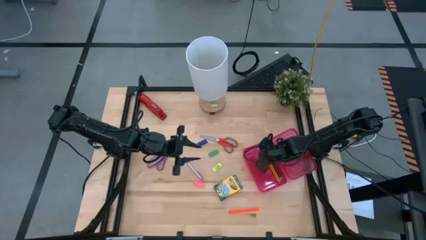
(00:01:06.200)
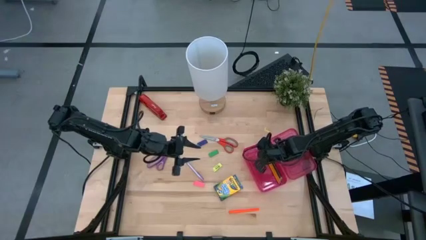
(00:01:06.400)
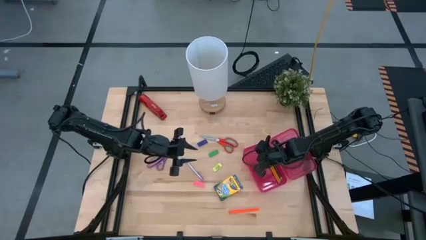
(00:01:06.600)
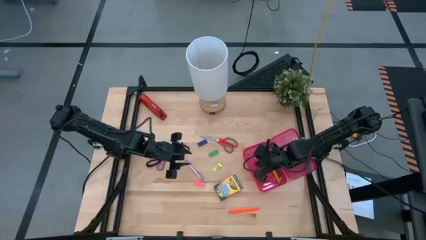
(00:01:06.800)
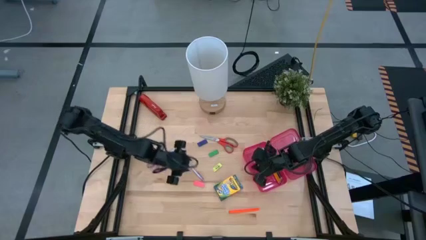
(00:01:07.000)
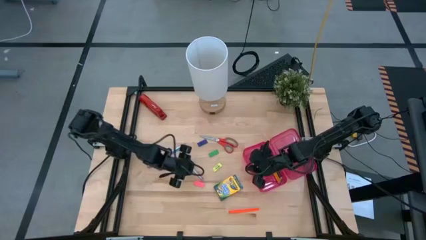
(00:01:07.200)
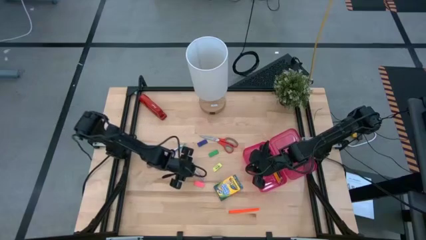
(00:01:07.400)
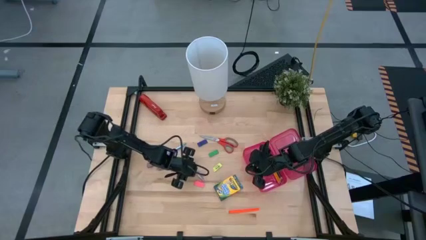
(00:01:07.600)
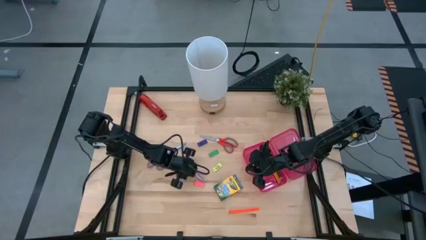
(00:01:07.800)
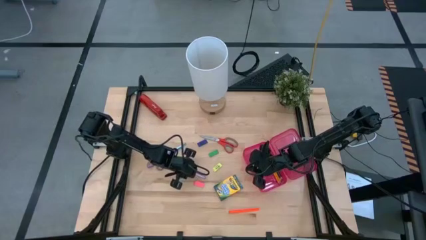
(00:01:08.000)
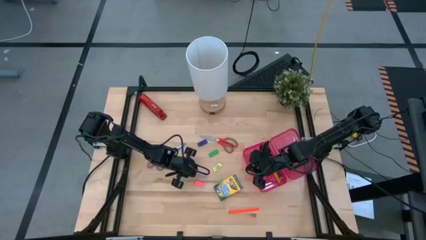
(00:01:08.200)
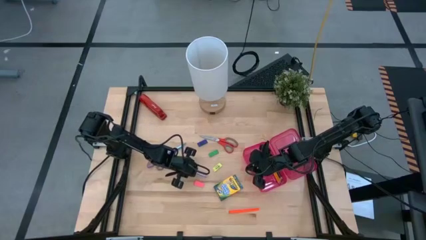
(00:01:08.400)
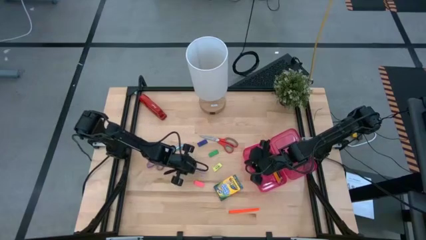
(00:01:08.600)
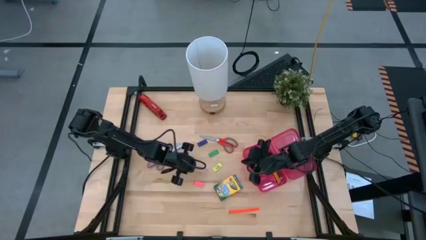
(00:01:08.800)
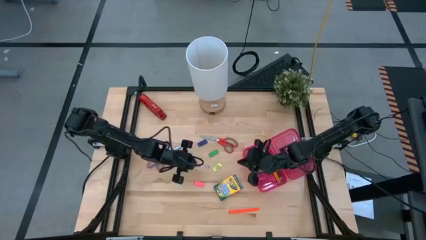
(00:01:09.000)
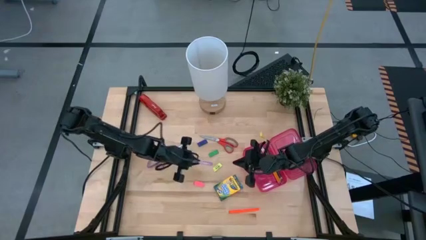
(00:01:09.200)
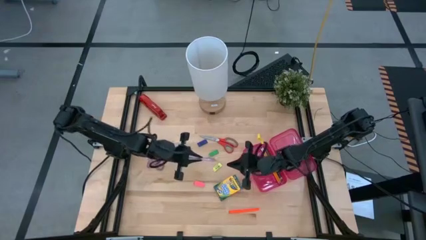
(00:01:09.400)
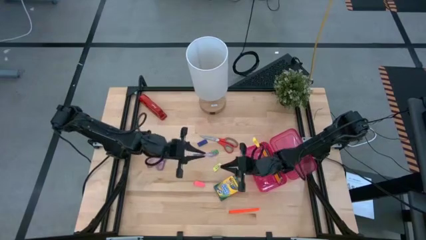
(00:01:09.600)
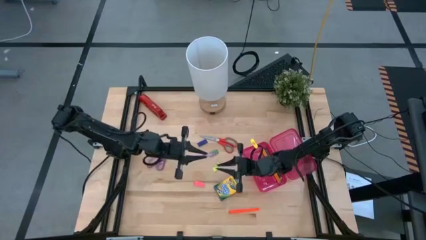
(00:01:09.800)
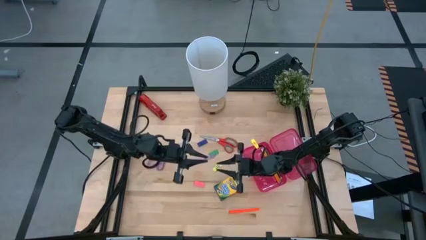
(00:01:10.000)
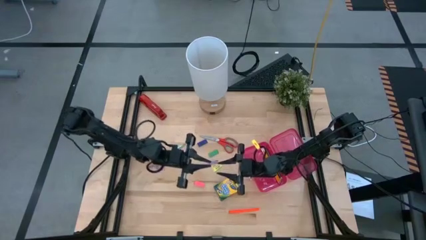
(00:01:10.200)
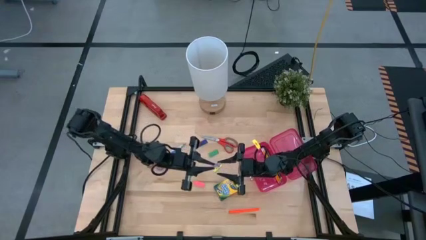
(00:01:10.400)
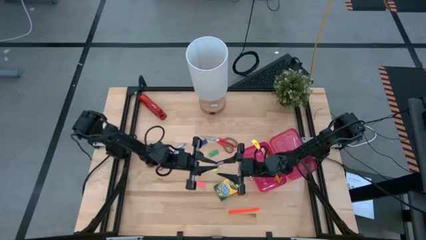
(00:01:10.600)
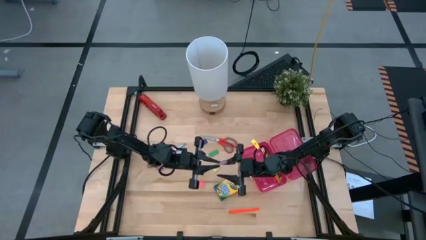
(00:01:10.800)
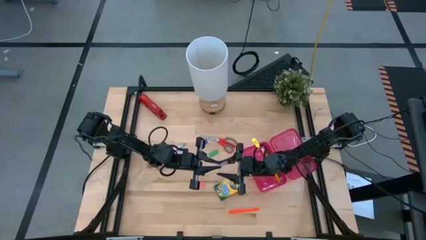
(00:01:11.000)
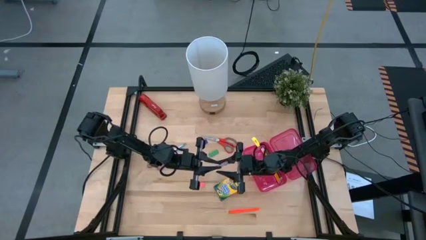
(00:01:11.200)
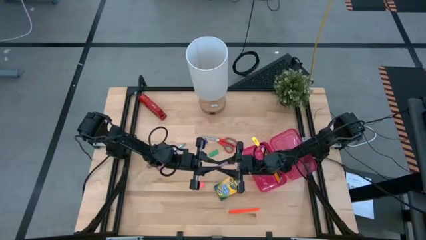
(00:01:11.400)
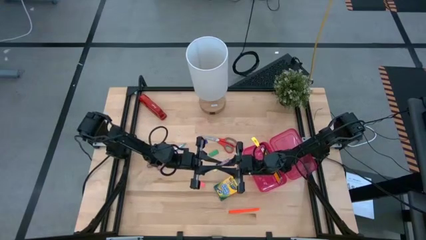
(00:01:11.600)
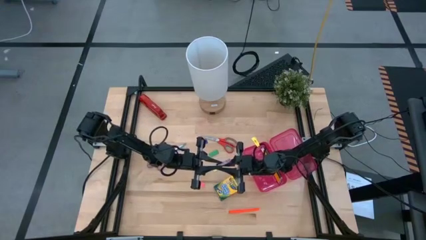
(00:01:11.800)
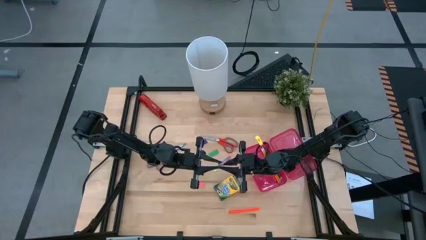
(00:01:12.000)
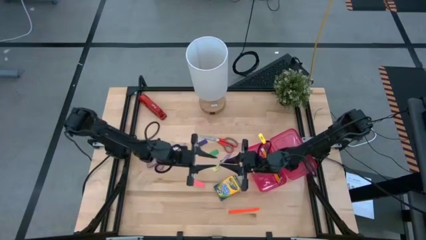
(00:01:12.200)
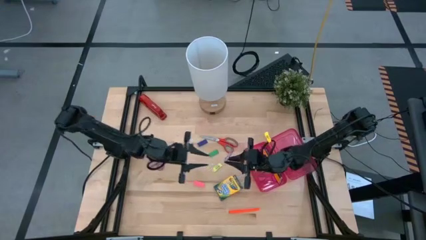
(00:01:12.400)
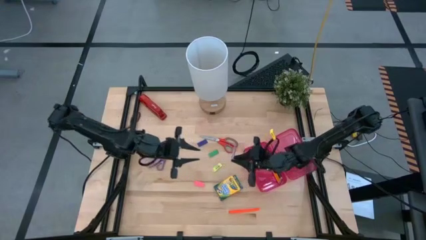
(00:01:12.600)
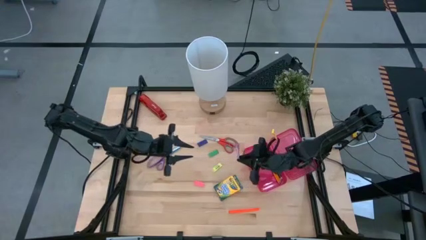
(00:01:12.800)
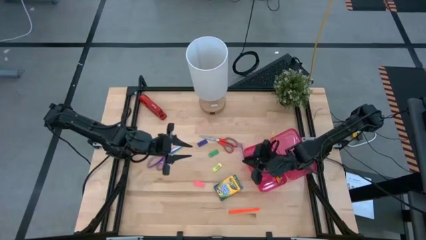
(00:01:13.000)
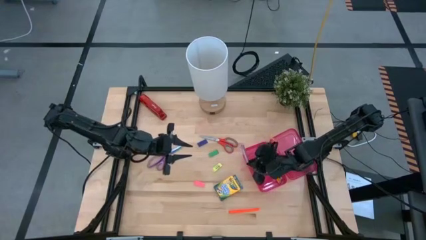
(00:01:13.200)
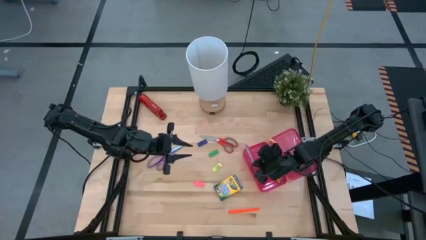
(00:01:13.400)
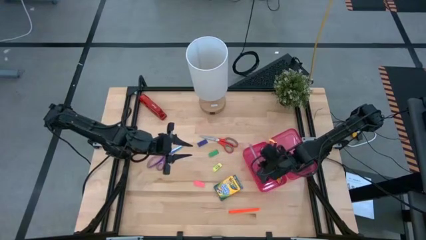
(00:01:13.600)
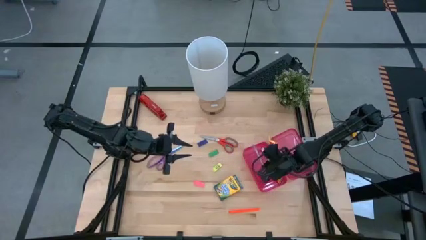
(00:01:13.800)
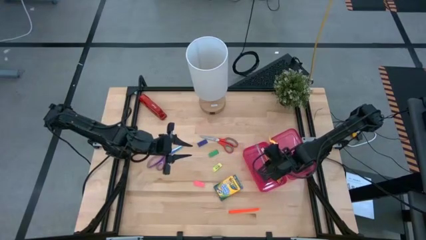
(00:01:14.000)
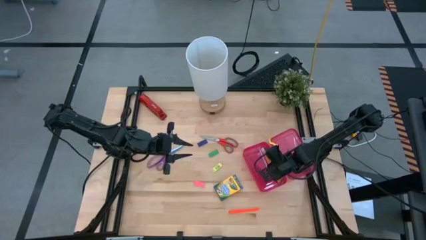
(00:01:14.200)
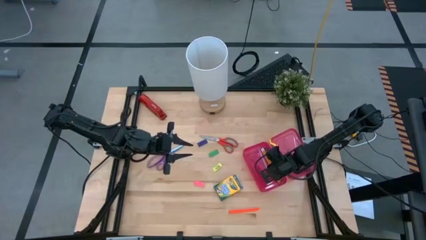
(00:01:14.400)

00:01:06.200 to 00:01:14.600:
Task: Pack school essentials
Put the violet pen into the pink supply box

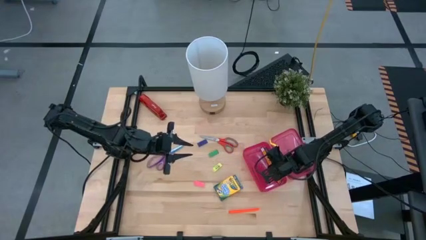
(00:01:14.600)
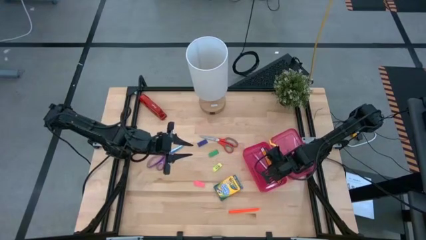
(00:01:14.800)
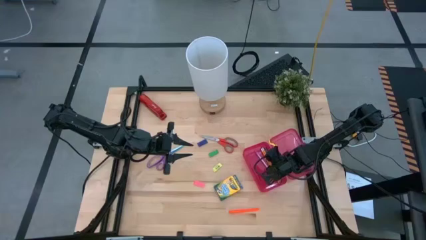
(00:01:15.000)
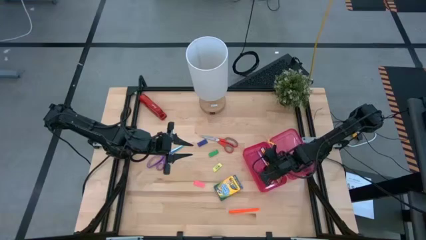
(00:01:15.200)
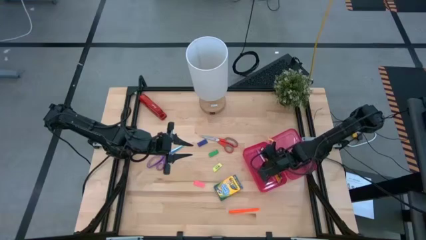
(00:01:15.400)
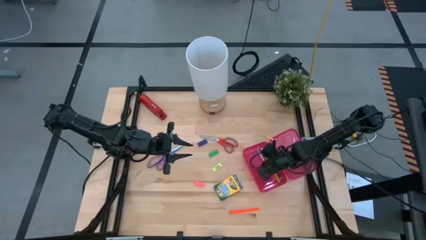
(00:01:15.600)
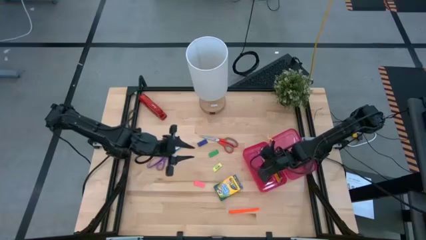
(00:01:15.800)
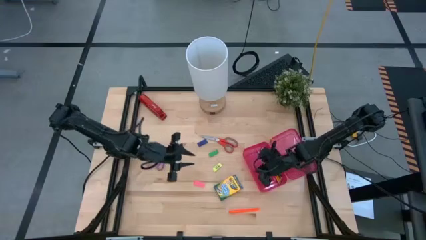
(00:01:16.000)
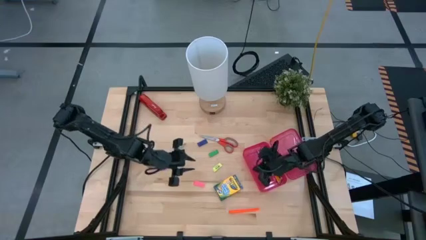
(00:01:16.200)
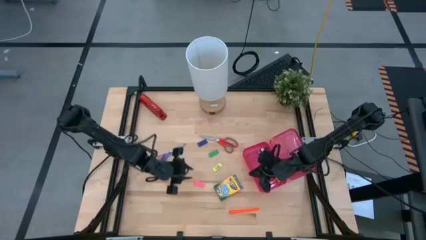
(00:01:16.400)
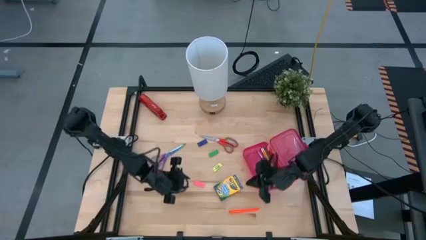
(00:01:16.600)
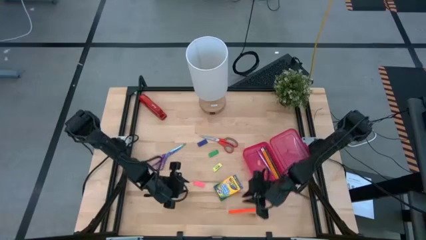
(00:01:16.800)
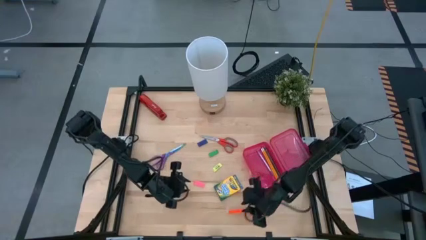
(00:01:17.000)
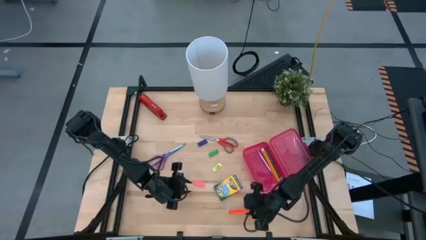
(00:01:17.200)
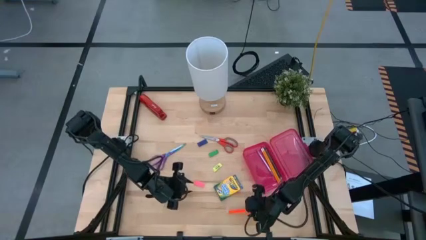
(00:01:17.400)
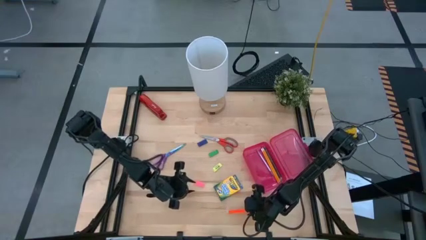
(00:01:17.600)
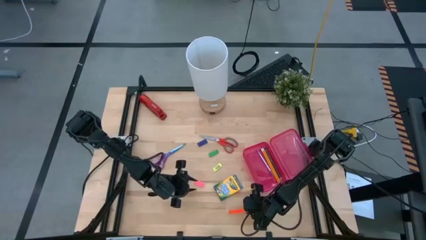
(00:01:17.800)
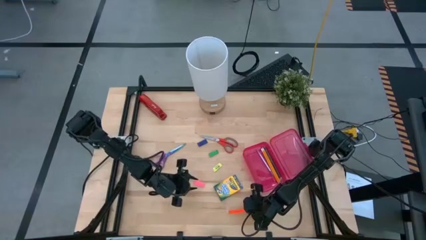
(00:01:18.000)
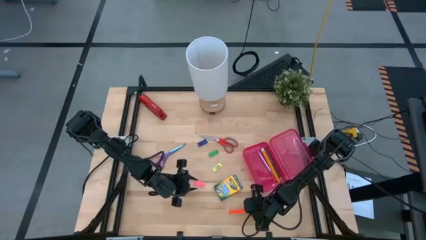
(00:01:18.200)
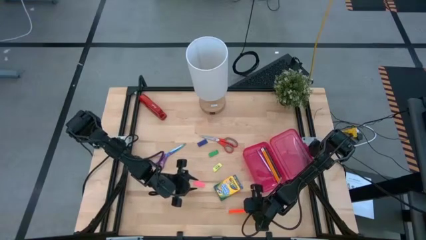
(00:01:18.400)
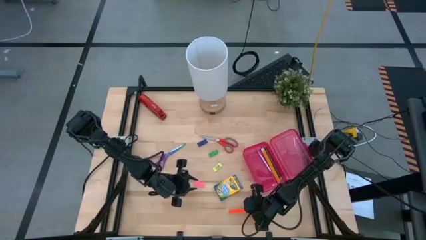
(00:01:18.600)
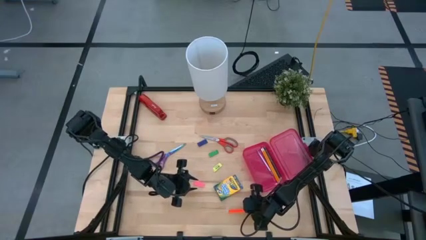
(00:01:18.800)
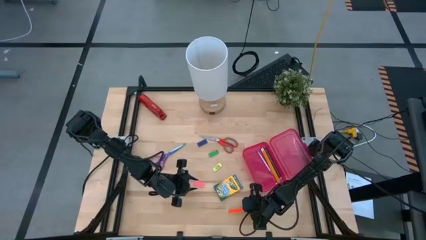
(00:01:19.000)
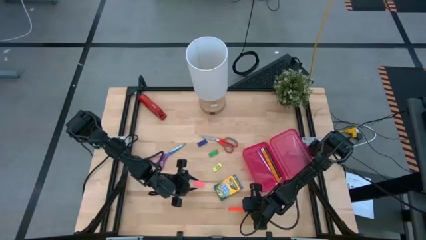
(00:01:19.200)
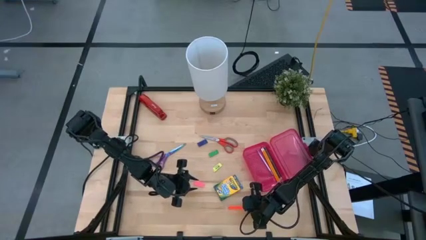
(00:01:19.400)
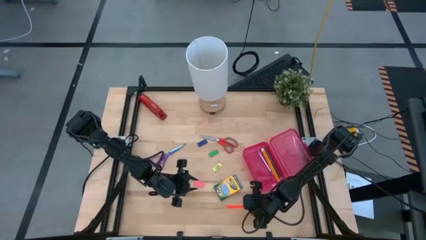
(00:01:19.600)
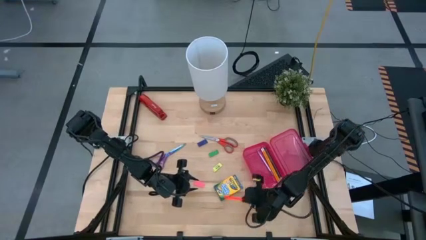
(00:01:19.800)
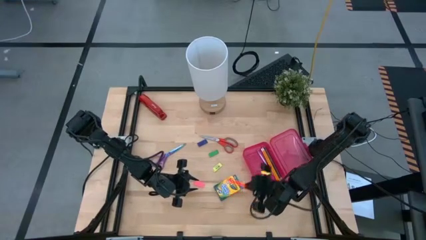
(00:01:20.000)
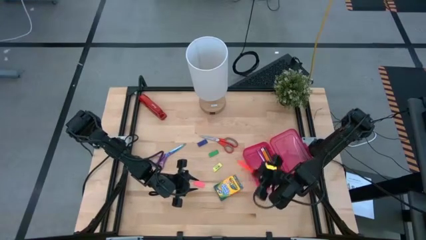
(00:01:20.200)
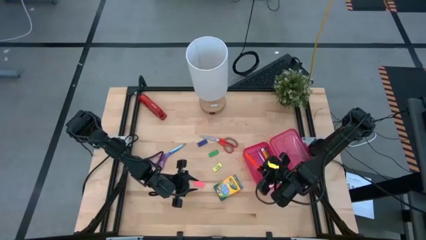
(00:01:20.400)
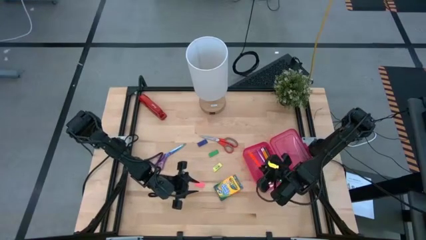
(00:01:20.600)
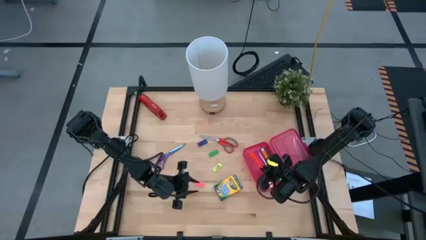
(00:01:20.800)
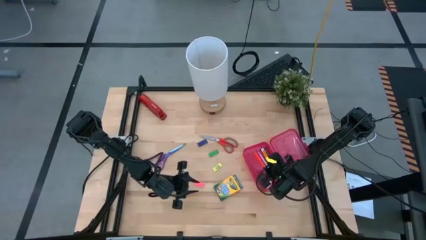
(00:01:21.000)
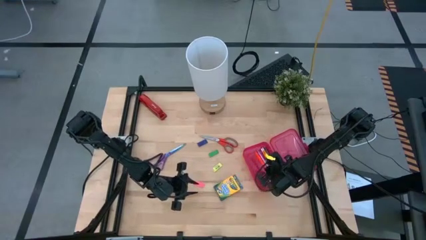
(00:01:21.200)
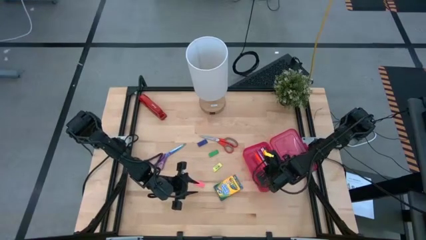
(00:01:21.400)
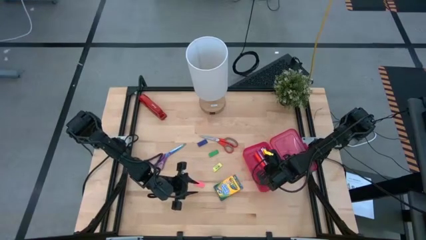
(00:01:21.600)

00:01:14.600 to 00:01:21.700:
Put the orange pen into the pink supply box
